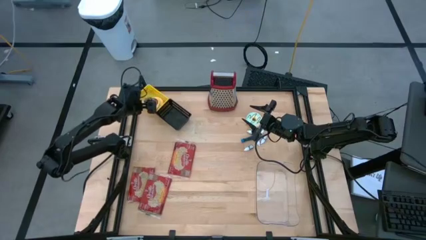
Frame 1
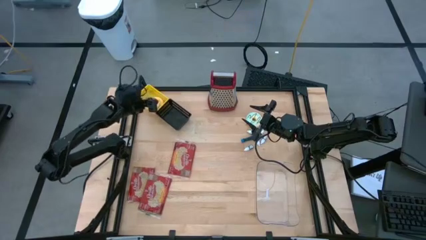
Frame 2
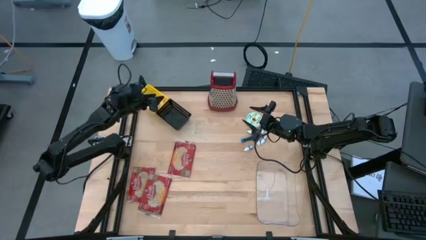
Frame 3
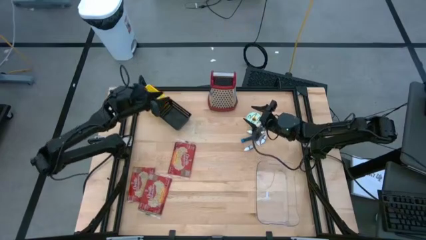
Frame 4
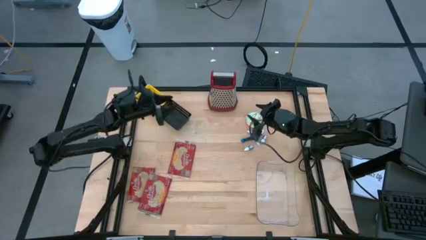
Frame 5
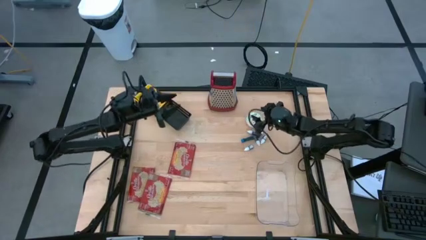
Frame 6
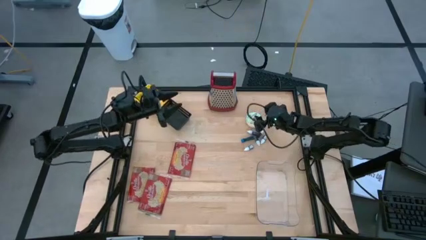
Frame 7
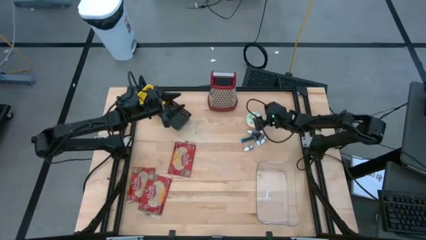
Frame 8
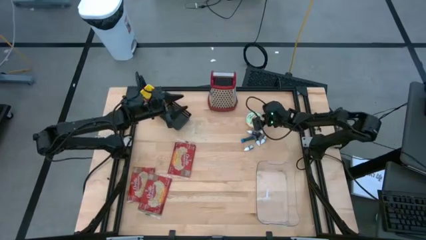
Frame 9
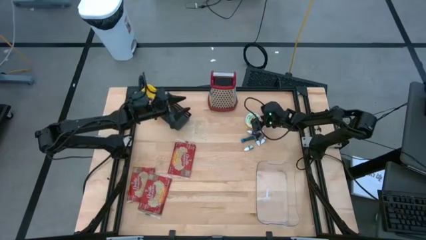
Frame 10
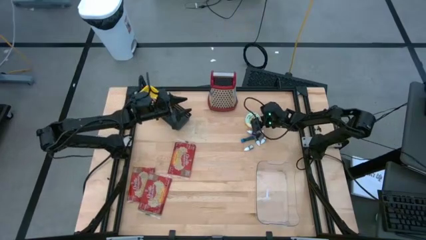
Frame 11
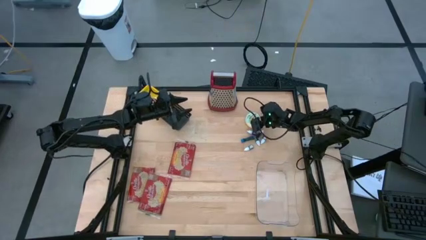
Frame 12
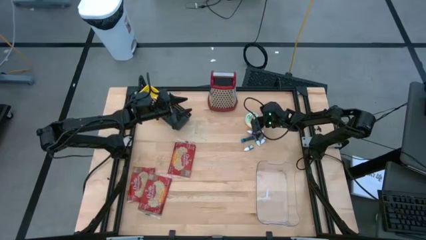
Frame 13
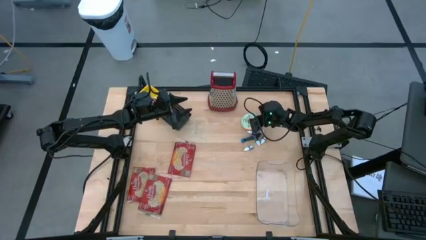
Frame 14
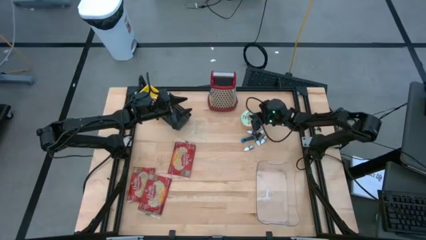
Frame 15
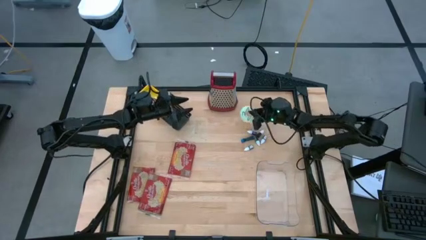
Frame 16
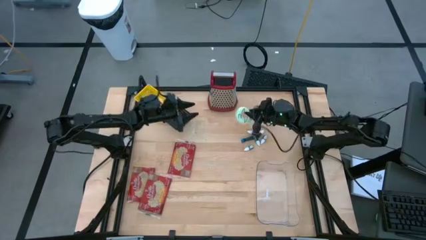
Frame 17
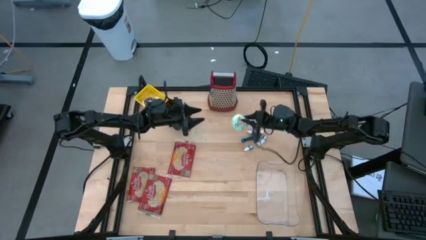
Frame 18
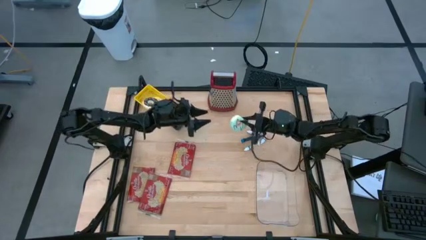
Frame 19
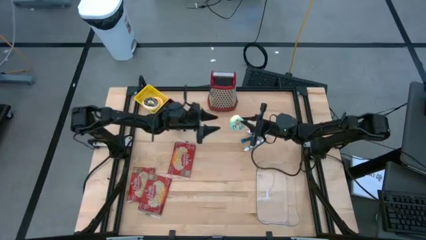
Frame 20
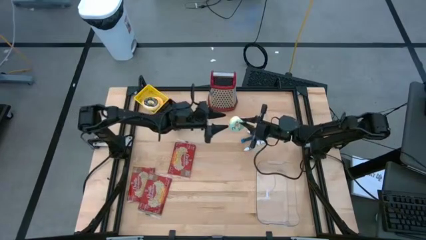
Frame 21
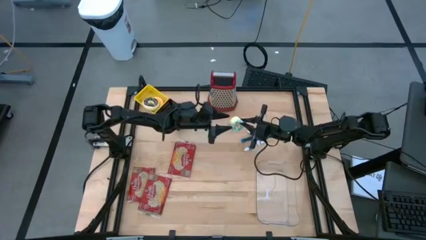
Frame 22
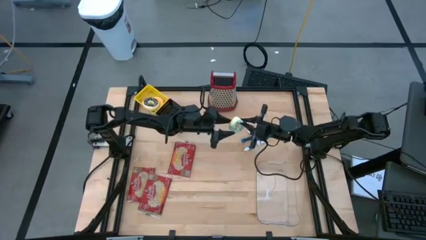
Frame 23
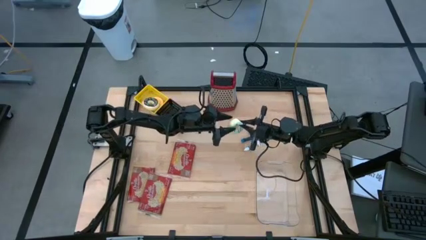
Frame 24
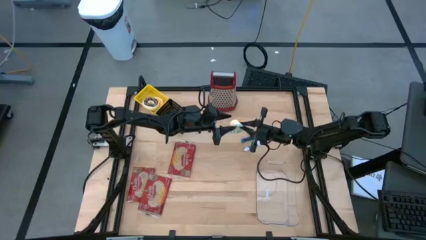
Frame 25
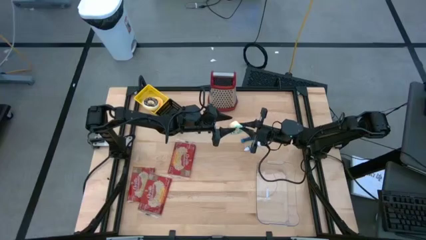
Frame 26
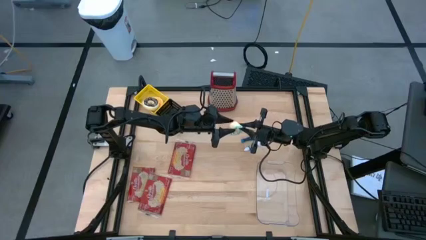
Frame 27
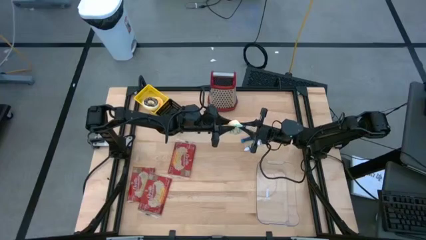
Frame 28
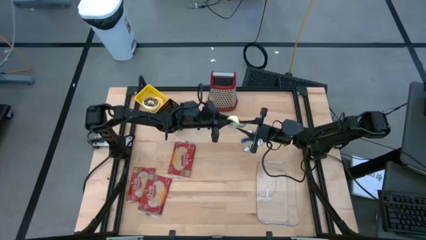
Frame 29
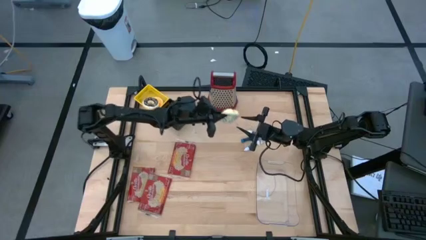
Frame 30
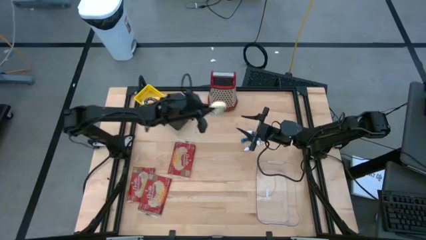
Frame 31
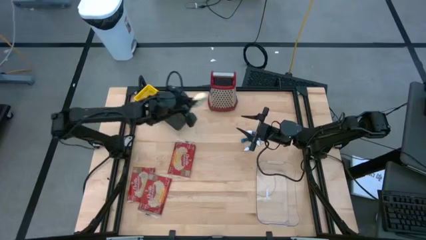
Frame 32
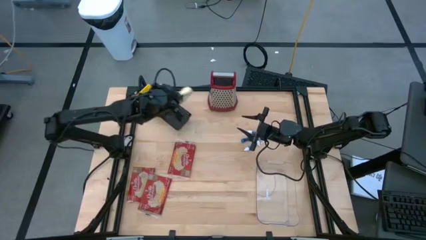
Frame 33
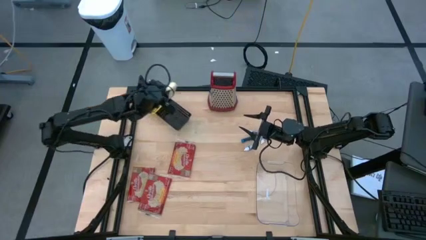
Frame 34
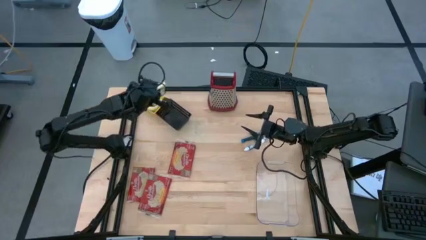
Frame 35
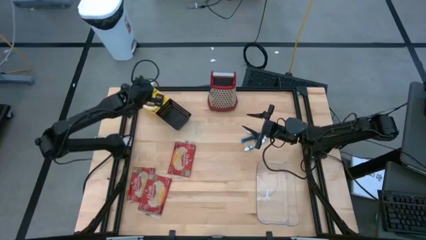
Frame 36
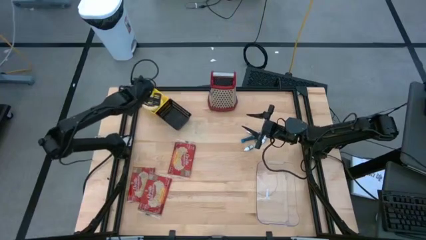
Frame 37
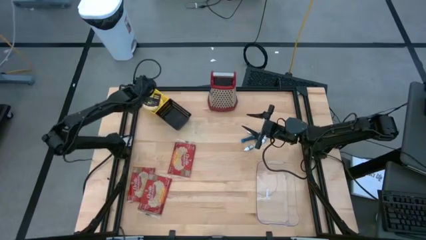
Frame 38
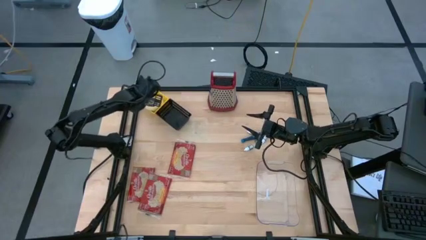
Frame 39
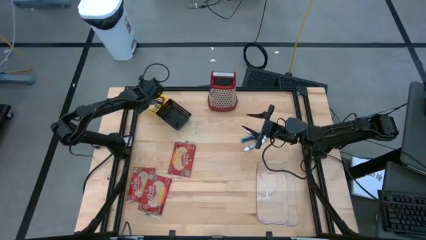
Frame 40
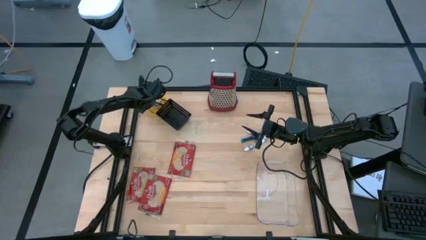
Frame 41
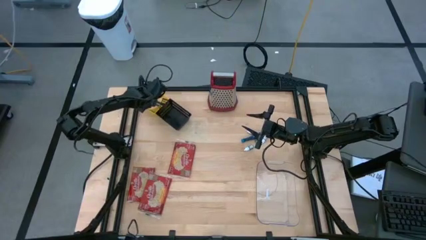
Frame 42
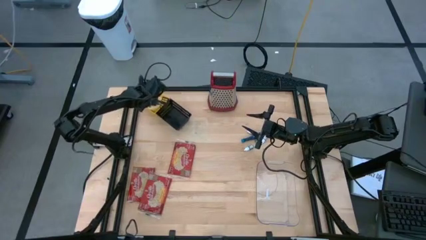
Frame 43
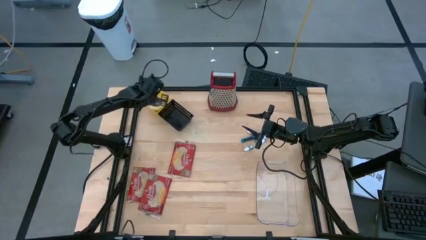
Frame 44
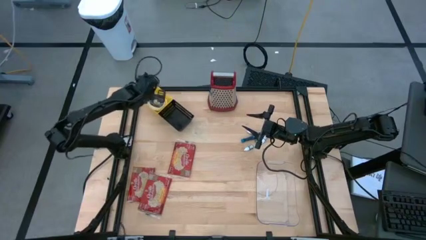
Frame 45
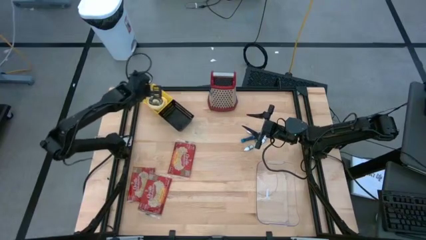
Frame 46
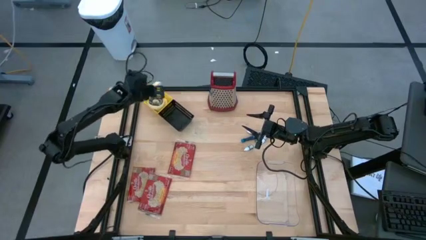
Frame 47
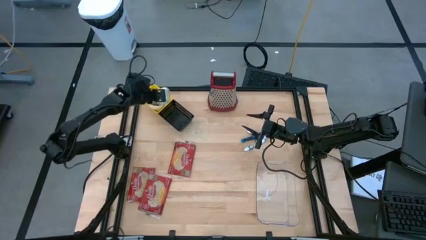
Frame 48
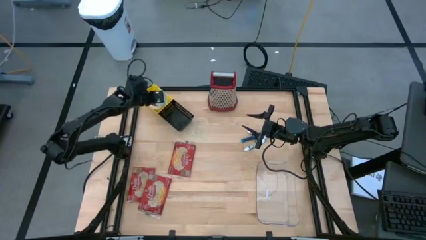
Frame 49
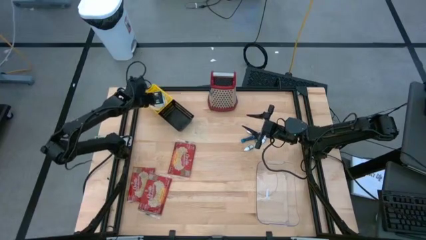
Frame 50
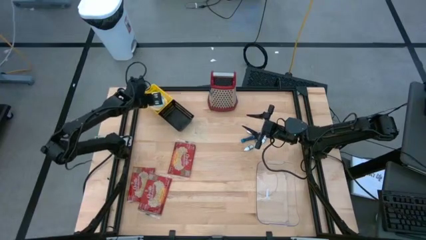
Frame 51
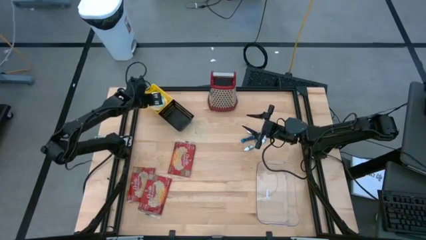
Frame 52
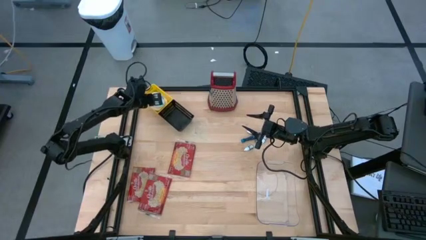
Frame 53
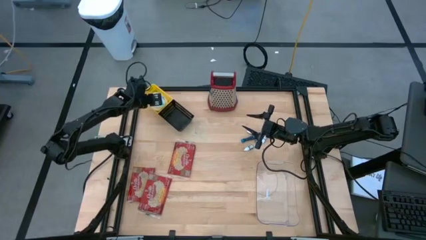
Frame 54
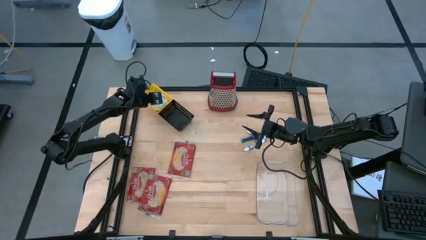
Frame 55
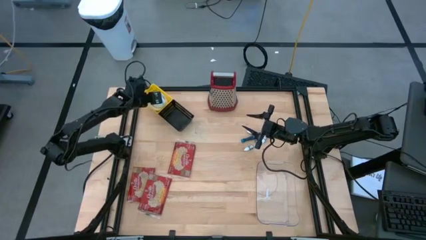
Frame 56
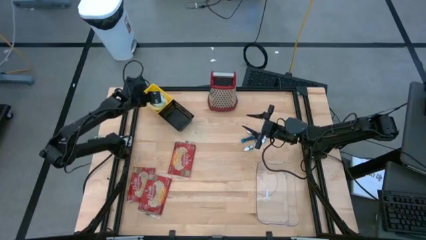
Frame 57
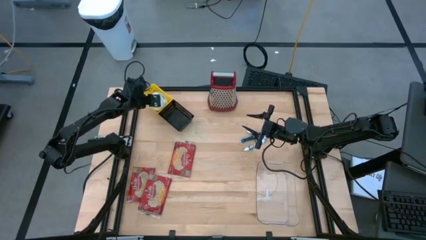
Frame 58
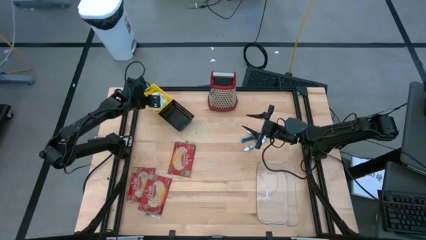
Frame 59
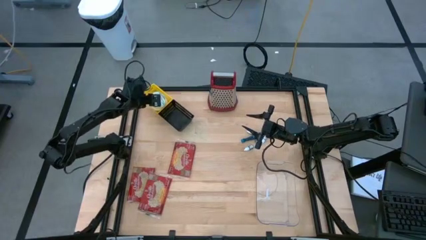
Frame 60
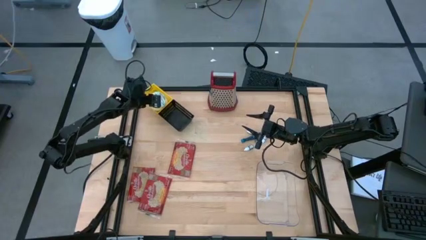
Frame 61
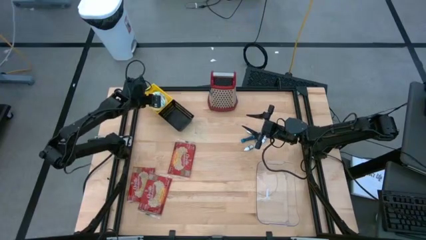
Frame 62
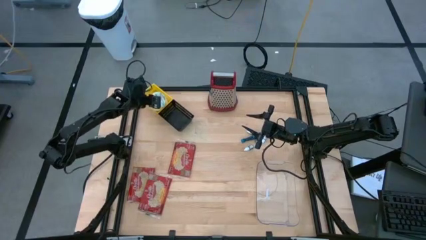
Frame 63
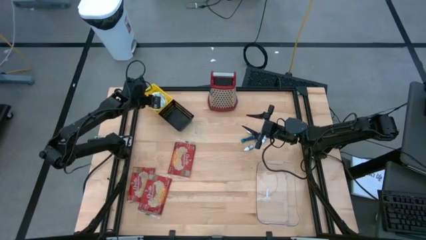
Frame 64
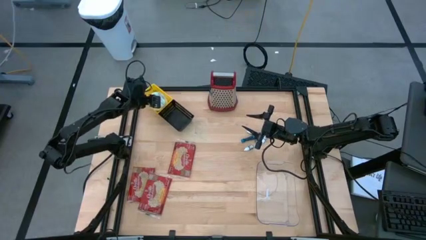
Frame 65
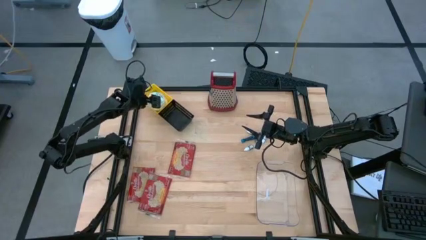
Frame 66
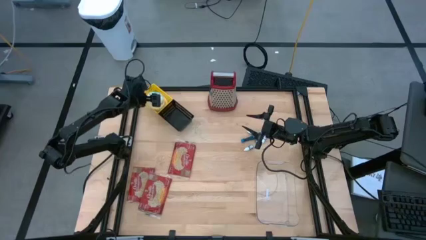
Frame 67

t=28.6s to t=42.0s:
Put the light blue donut into the yellow bin
